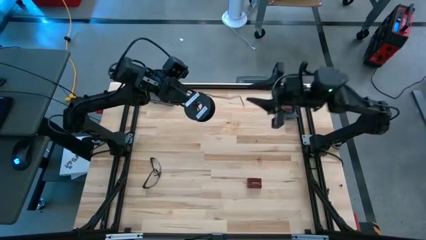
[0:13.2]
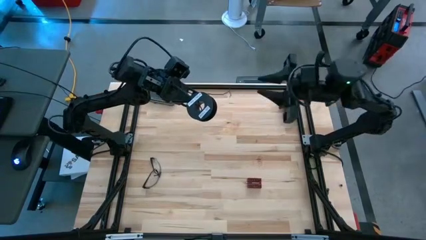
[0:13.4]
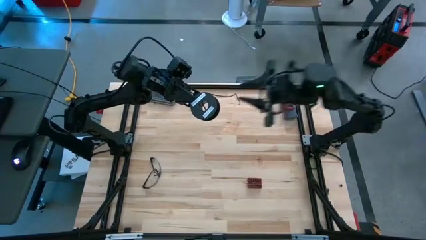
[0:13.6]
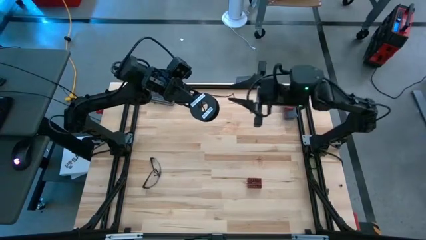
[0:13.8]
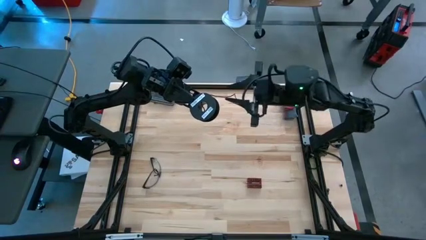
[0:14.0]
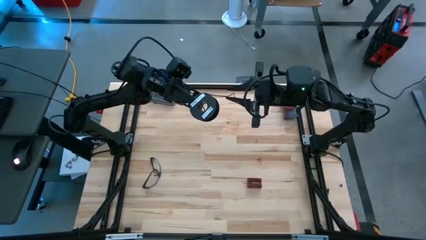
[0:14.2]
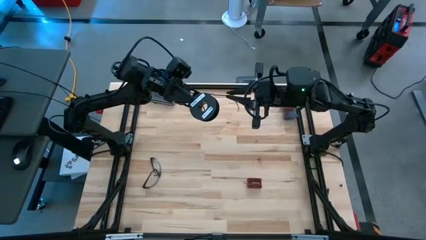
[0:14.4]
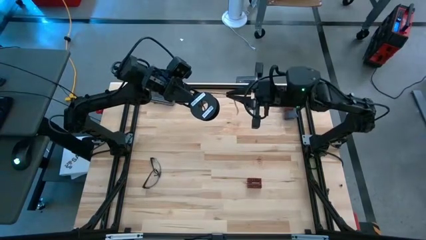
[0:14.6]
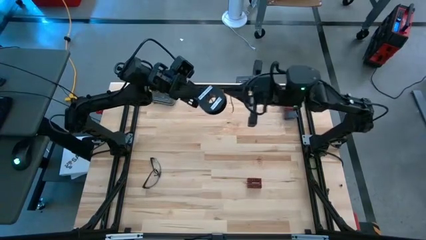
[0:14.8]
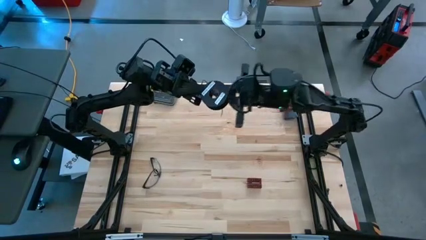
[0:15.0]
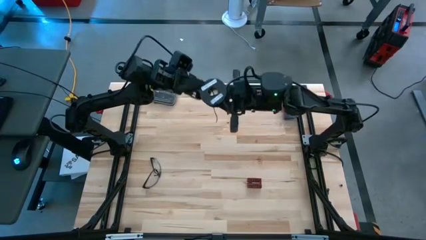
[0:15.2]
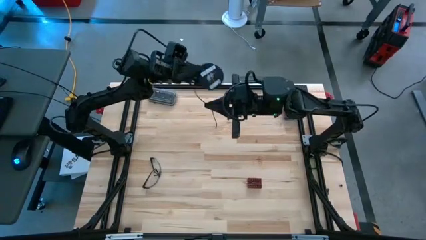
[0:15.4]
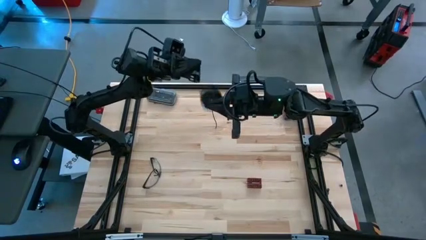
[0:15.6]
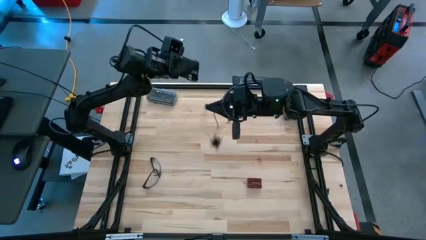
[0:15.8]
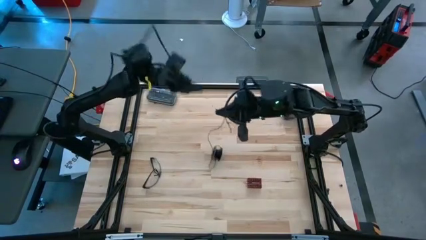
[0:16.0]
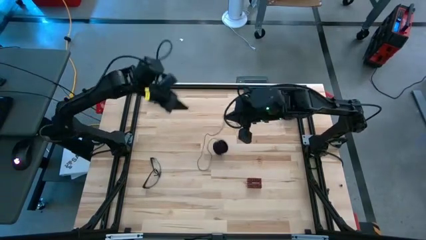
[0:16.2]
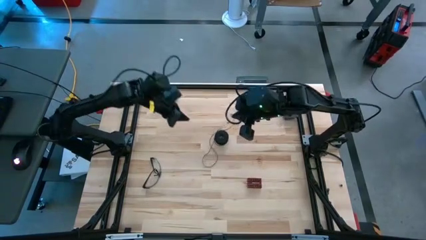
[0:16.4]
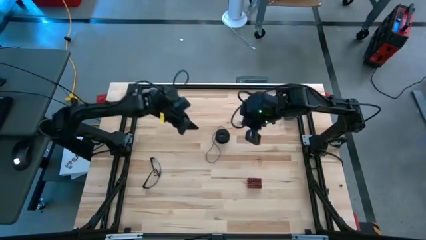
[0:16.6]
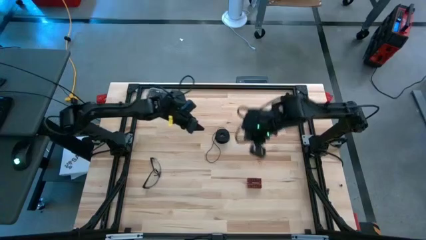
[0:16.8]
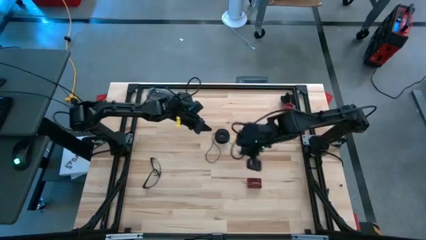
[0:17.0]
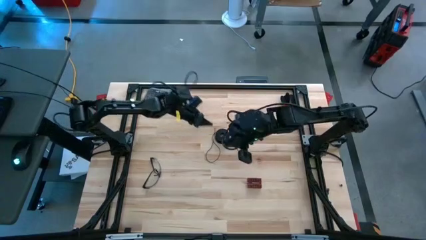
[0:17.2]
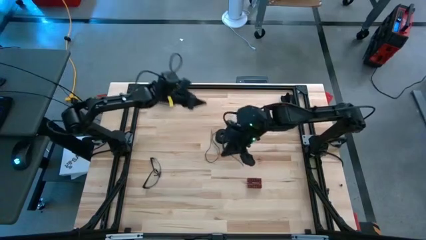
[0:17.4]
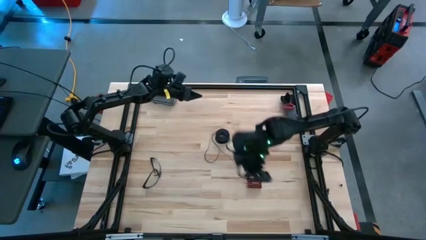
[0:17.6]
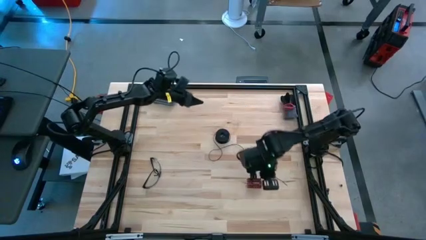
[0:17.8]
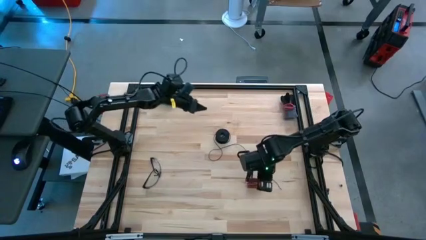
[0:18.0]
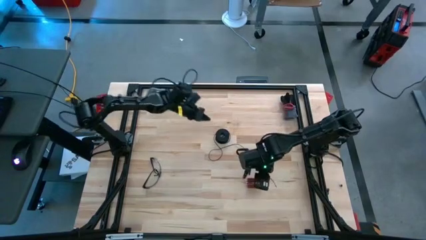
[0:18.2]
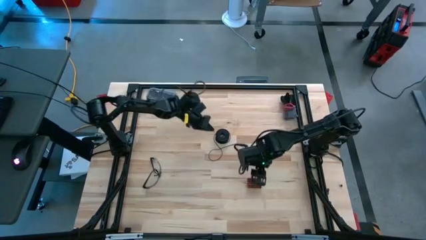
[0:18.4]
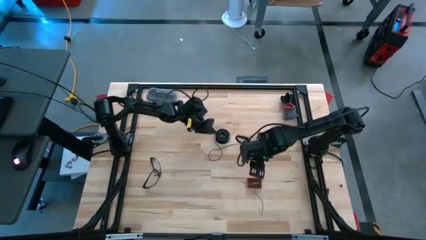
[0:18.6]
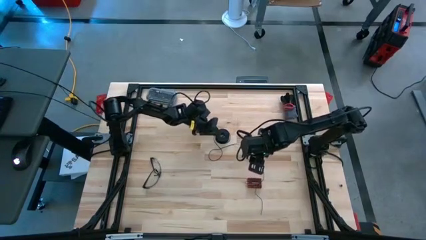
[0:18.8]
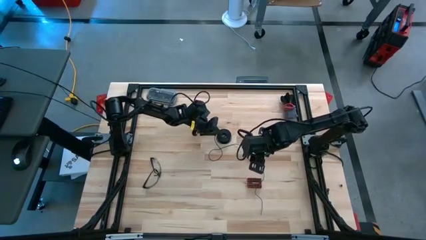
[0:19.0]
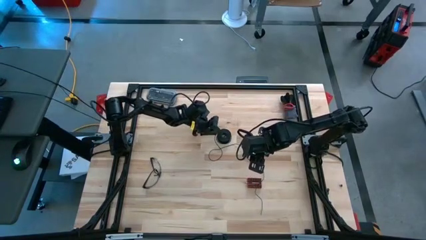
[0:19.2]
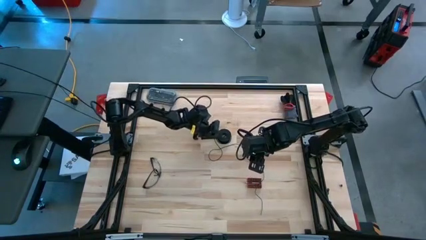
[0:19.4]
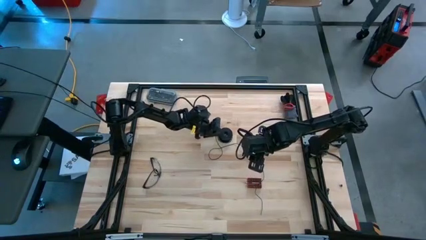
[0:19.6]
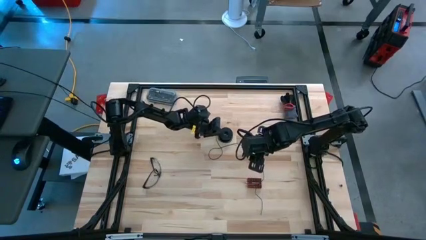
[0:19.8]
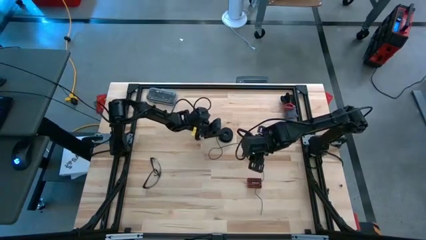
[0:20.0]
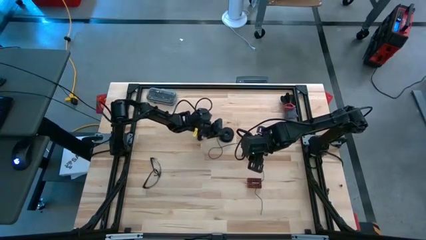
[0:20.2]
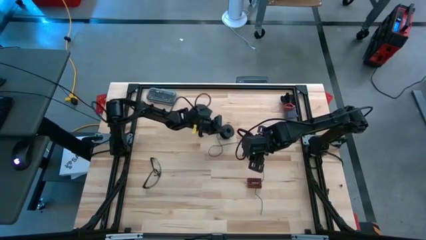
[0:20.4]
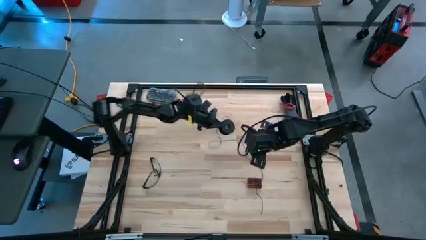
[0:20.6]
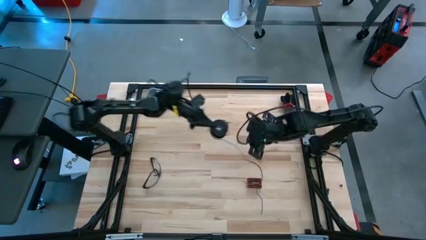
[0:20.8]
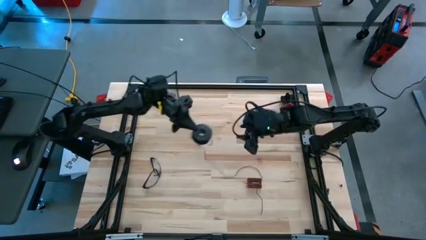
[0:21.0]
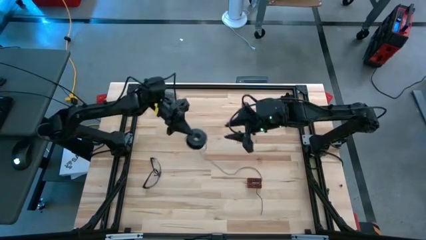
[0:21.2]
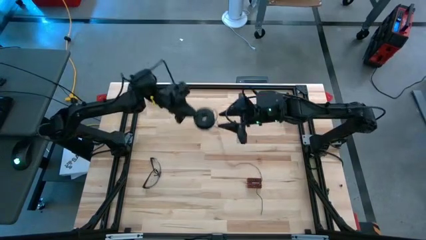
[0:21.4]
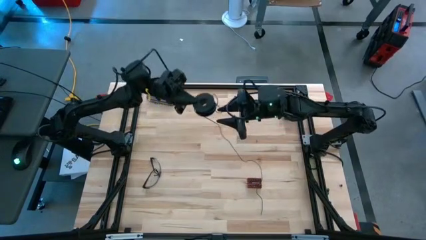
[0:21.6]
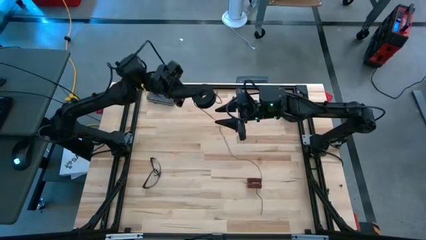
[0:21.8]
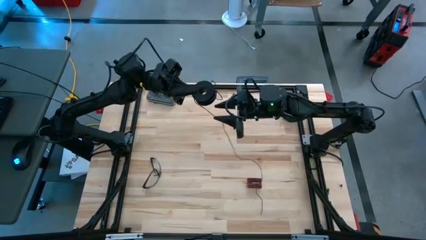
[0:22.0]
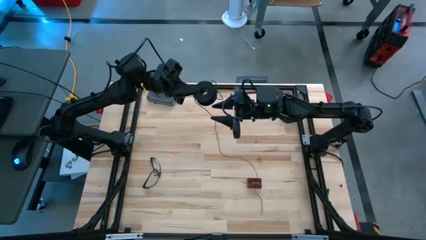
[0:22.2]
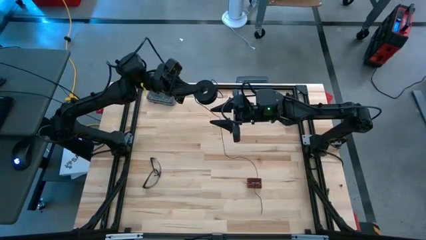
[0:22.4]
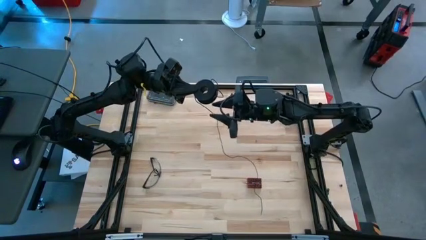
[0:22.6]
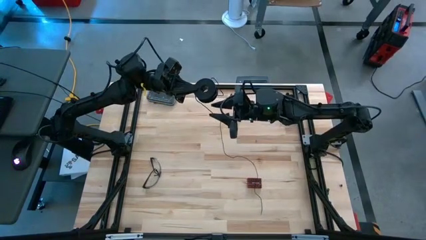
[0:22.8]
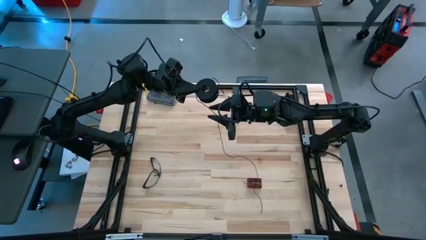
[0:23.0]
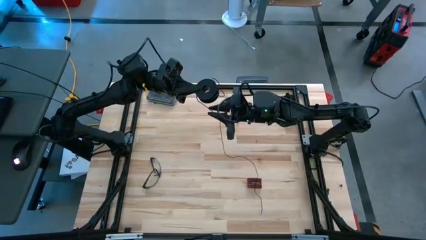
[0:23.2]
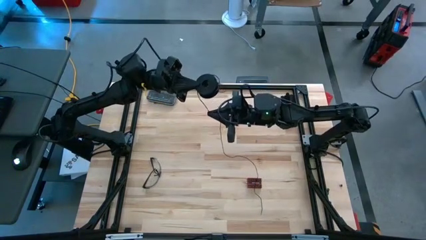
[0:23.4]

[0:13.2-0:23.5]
Task: Coil cords
Uncoil the black wire from the spool
